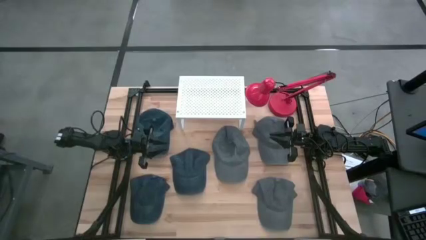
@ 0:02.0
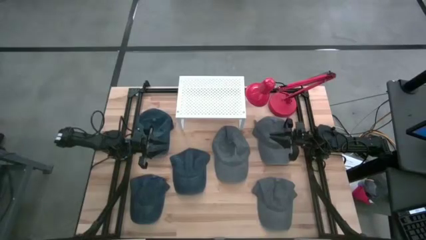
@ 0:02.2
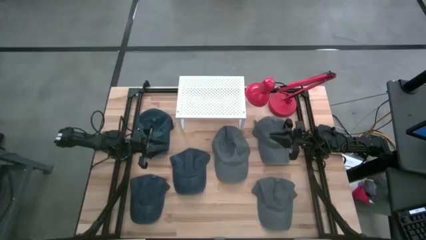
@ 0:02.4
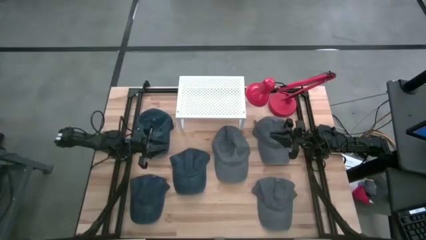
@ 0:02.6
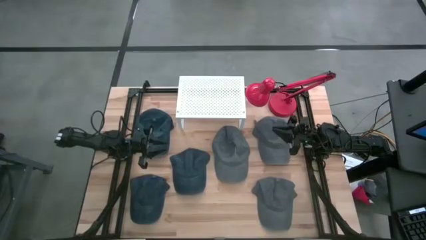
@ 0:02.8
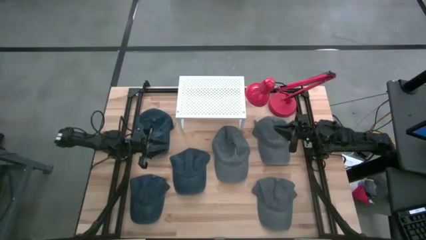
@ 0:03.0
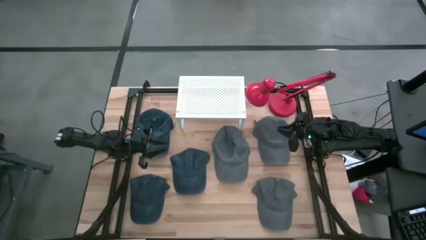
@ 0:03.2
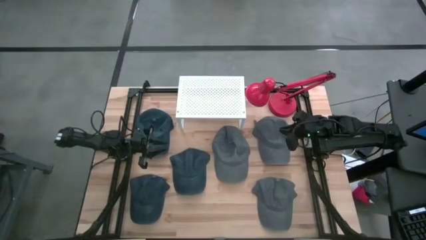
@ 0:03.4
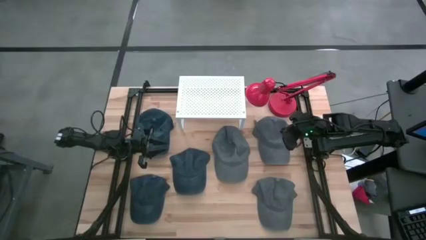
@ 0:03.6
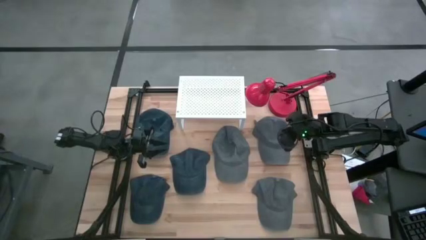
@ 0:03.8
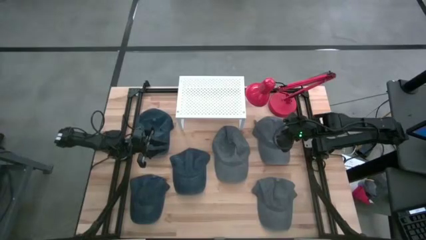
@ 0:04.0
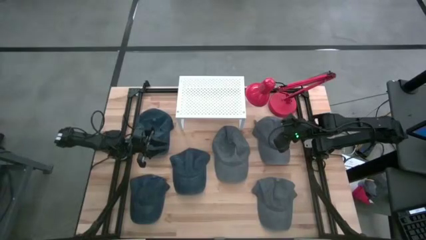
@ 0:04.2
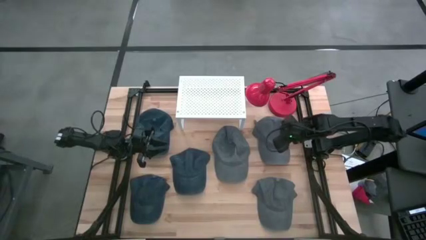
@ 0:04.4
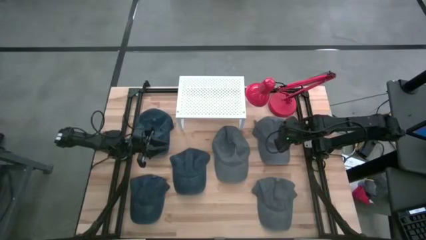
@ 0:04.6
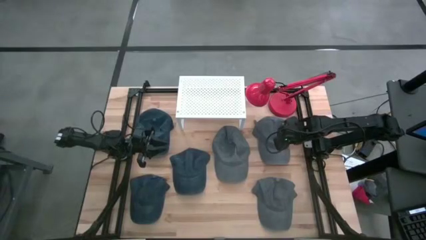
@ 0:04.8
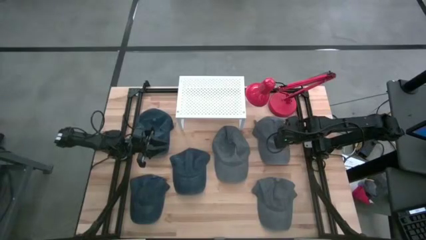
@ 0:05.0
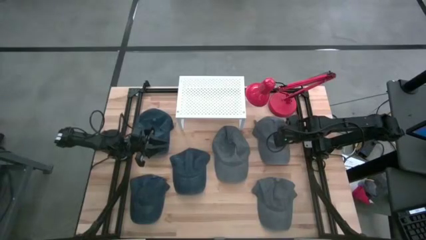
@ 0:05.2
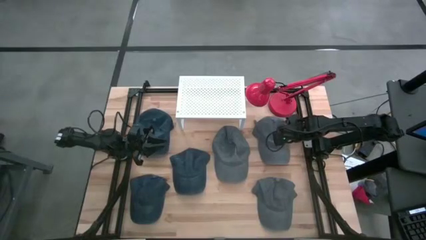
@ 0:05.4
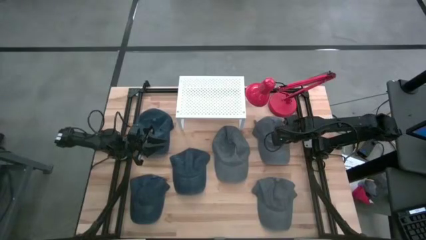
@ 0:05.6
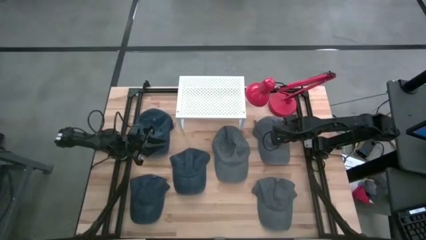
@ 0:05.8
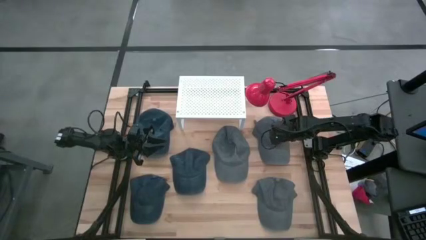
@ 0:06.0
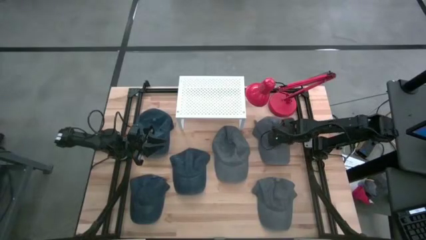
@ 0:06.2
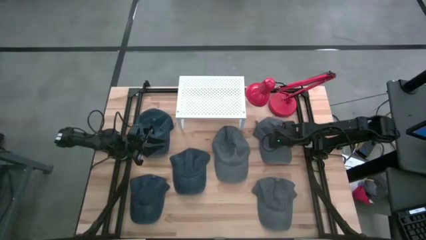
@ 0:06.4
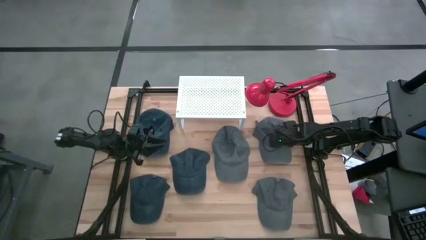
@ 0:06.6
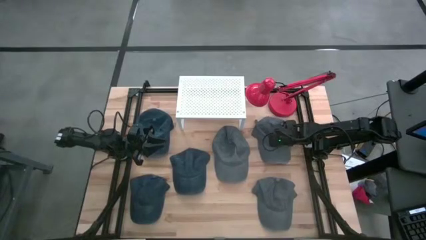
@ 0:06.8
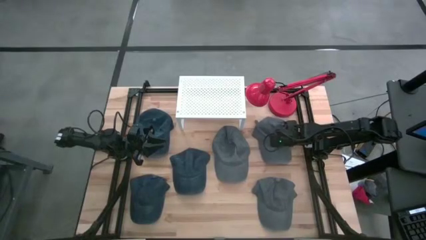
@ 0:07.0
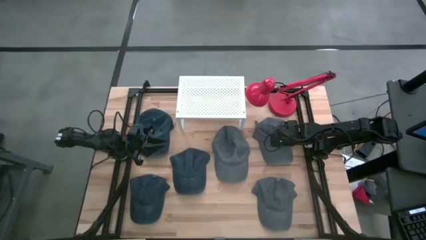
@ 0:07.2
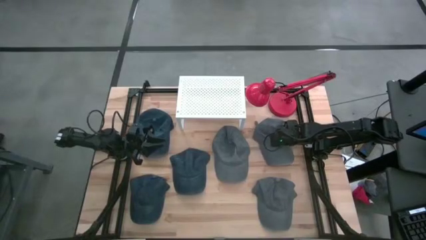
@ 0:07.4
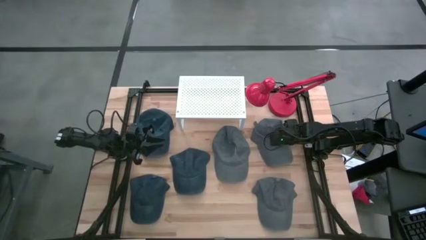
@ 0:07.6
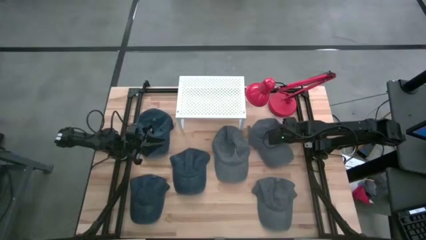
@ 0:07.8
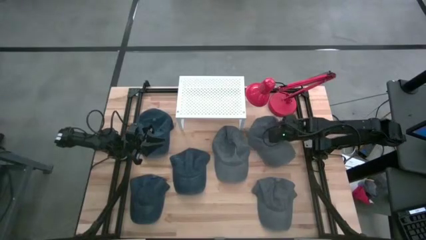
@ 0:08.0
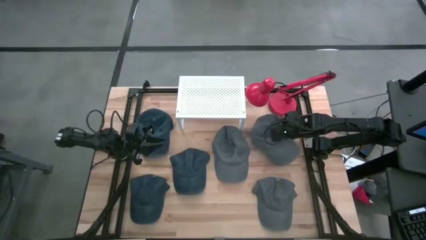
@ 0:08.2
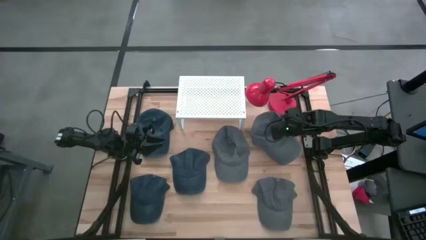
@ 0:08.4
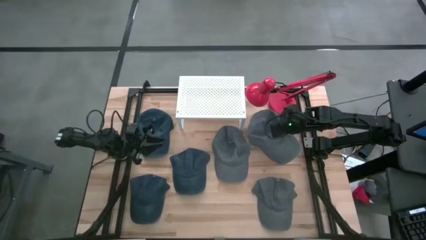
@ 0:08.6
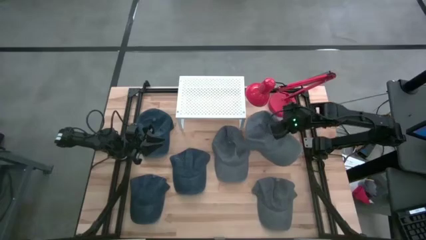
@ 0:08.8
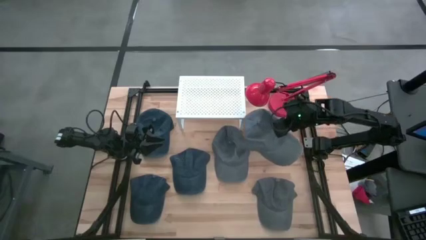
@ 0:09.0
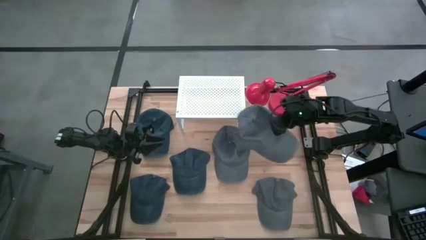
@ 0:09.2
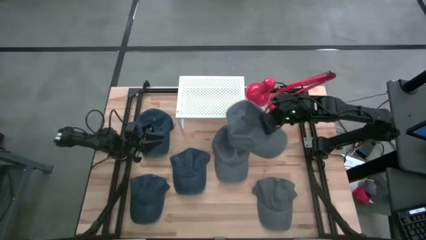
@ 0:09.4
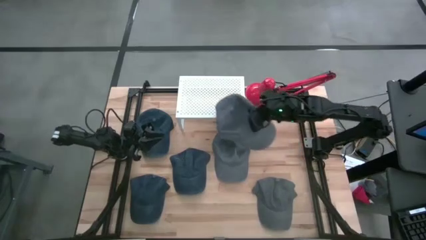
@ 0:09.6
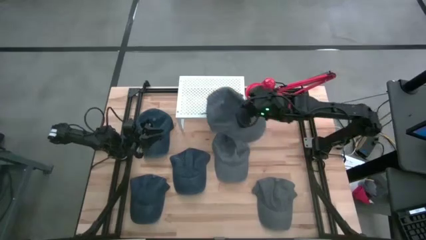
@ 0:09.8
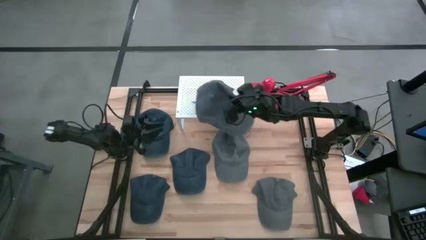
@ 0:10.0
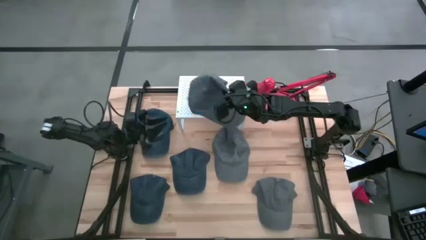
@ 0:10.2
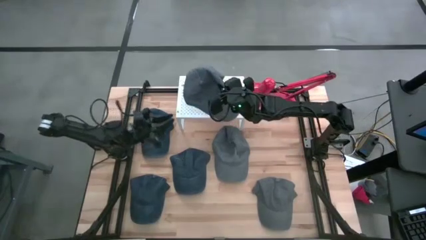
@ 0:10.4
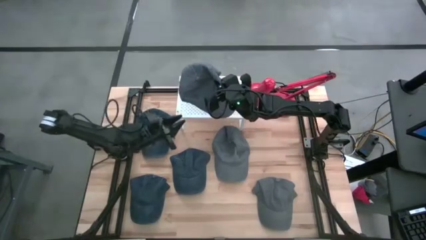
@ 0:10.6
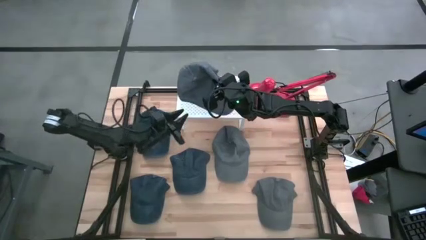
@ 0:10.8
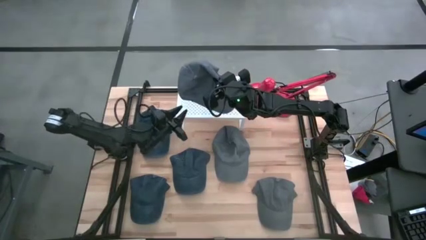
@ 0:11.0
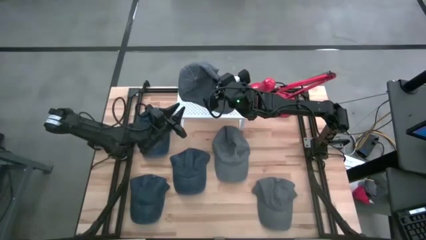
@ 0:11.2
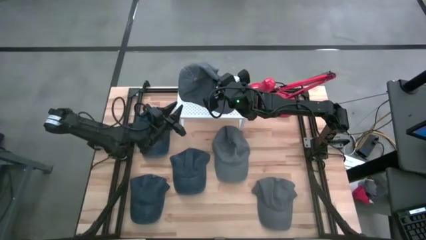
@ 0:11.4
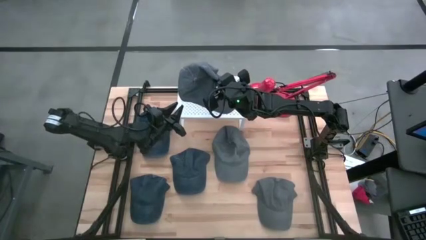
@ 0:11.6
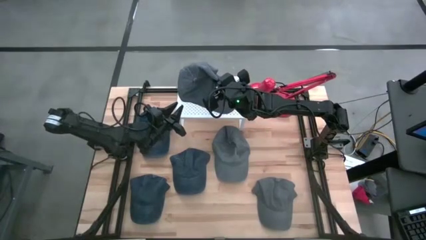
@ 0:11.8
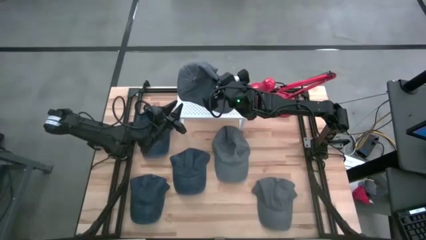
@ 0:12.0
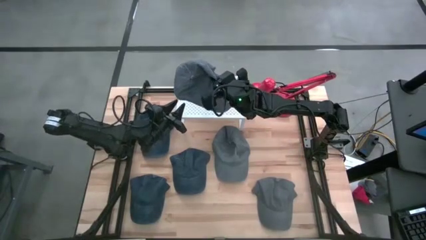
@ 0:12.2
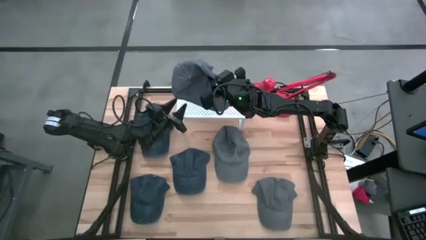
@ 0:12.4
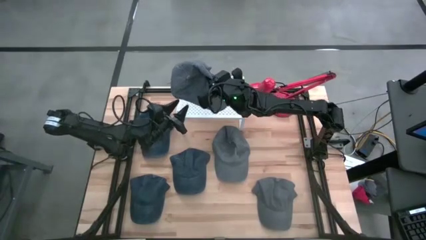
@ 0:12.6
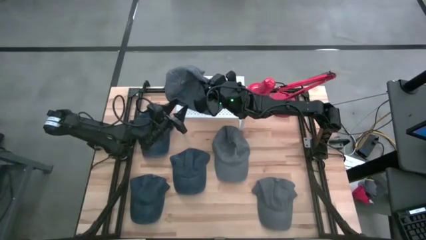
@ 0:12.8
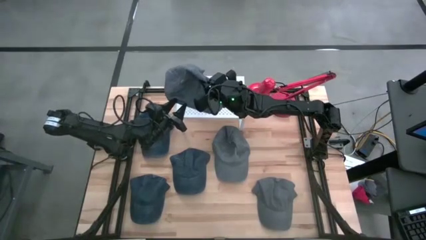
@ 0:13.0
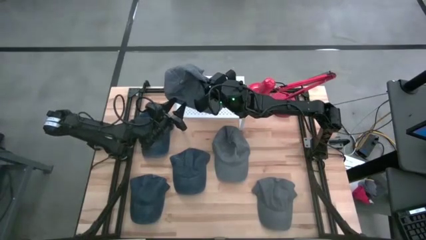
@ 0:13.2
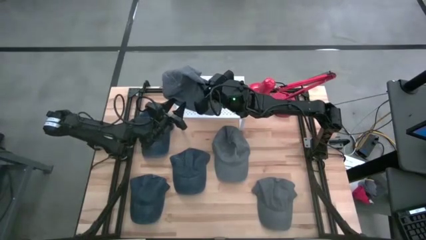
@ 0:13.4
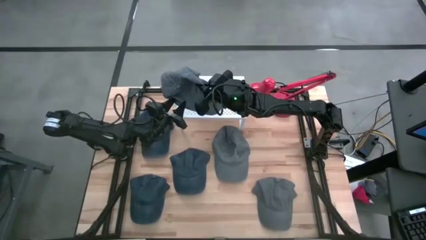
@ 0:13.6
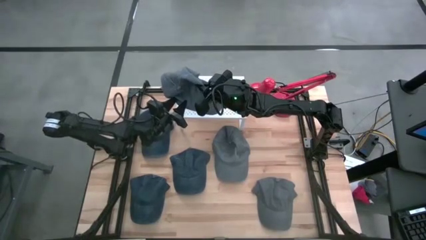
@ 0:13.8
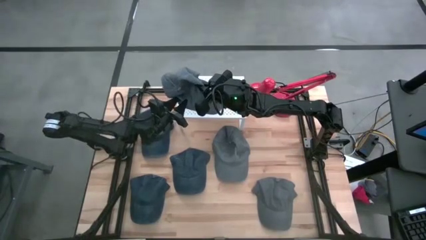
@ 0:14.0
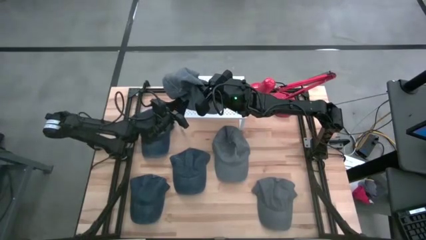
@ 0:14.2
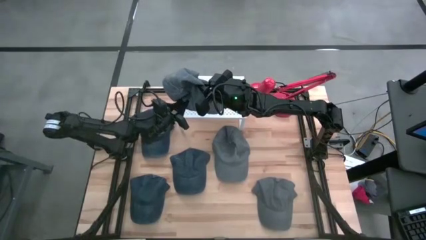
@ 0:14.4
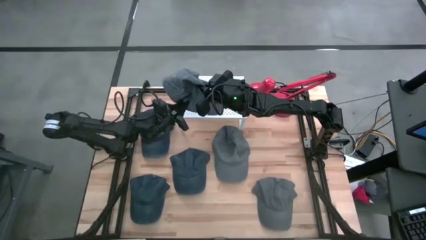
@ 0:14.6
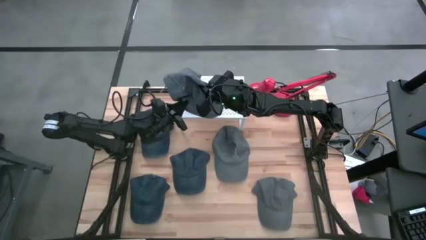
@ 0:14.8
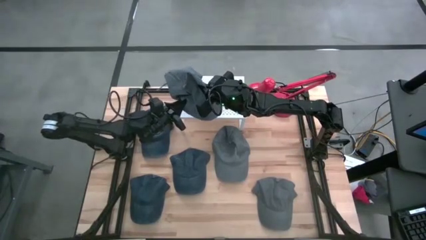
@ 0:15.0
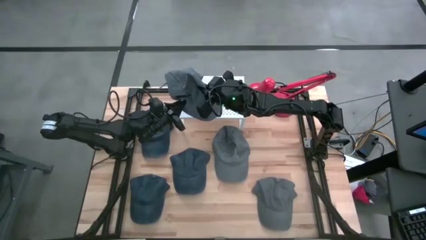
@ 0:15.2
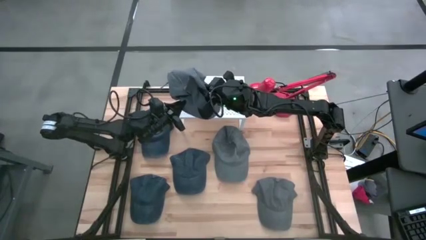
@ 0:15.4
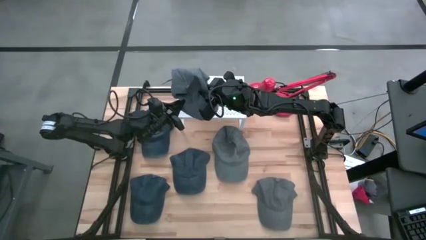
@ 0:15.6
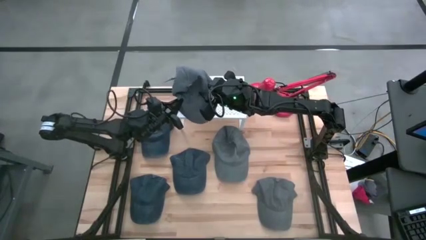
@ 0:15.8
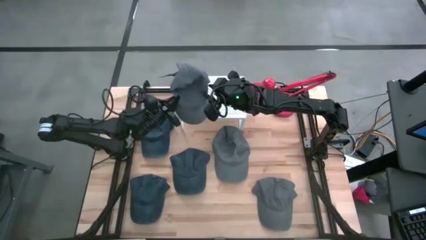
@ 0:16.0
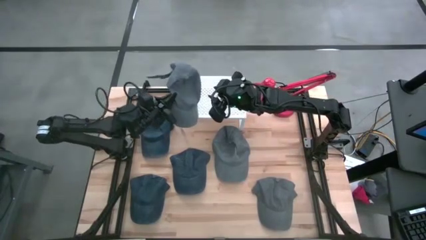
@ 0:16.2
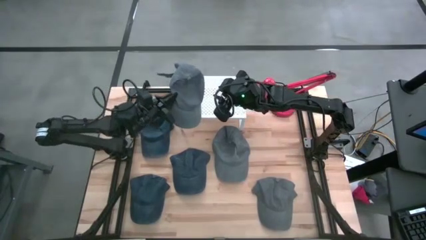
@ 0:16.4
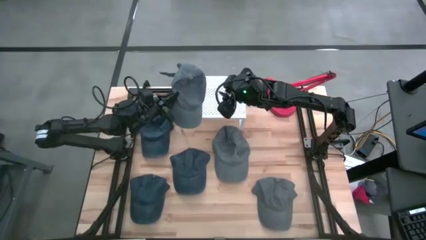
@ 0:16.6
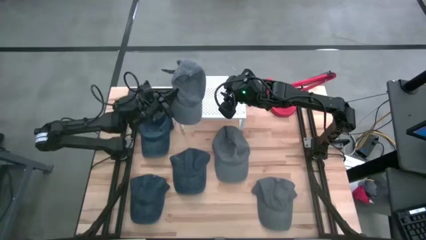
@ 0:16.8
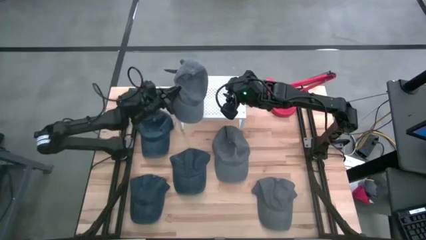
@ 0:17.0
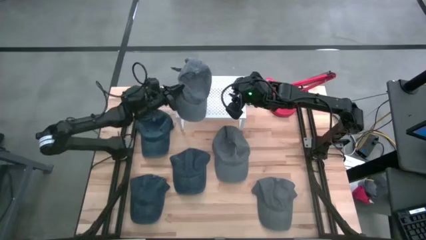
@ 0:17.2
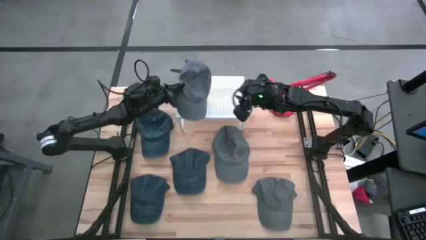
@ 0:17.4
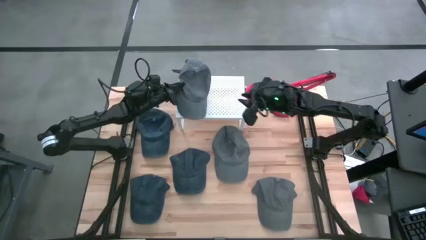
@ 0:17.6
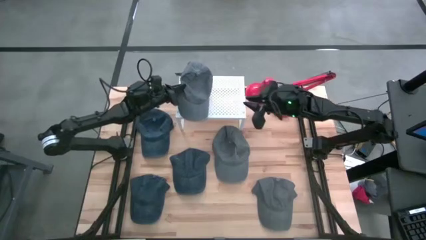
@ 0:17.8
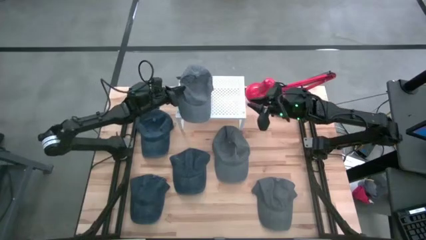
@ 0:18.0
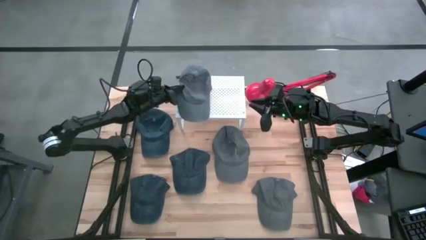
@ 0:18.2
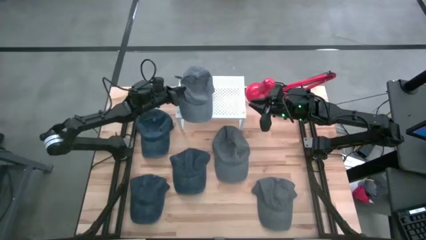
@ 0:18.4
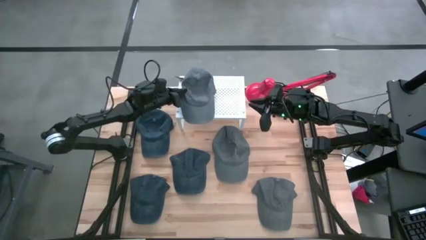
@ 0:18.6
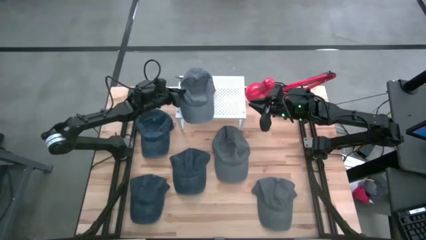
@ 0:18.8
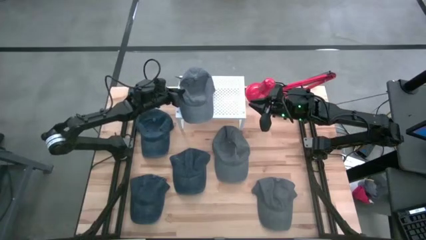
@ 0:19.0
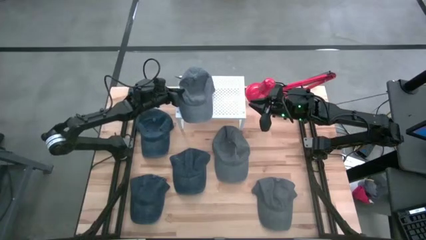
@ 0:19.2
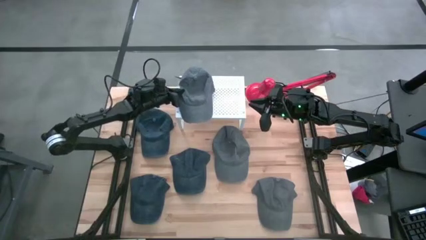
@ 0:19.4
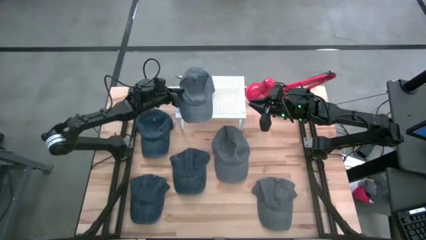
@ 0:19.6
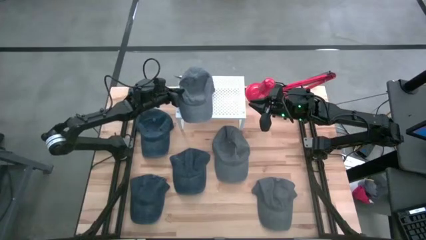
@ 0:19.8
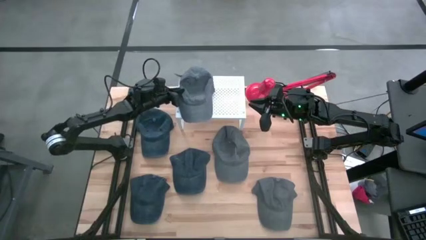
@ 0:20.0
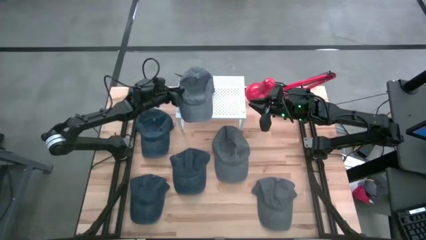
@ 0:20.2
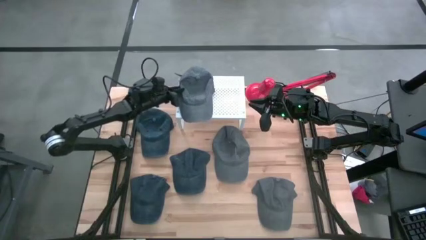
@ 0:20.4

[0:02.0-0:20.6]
Task: Pick & Place hat
Put the top gray cap on the shelf
